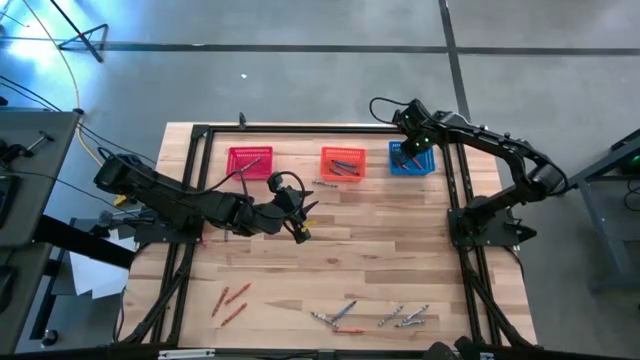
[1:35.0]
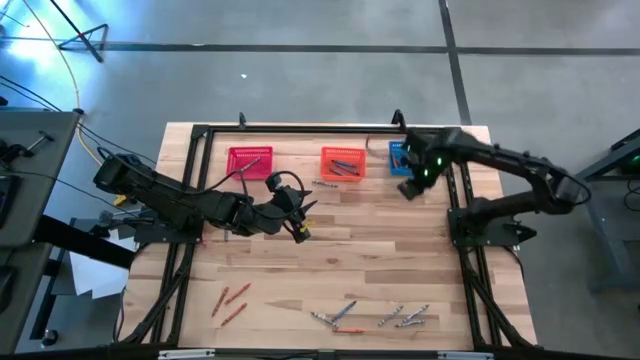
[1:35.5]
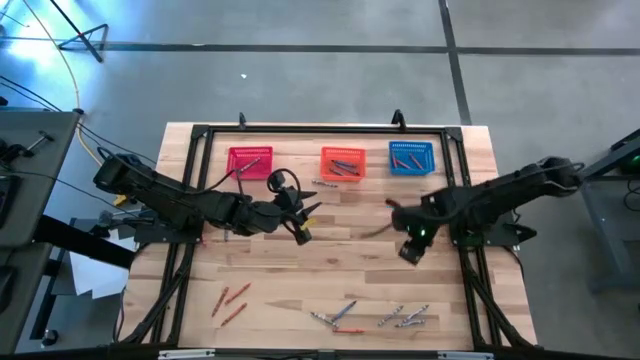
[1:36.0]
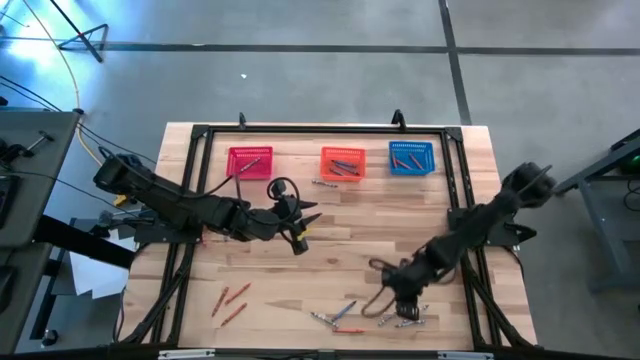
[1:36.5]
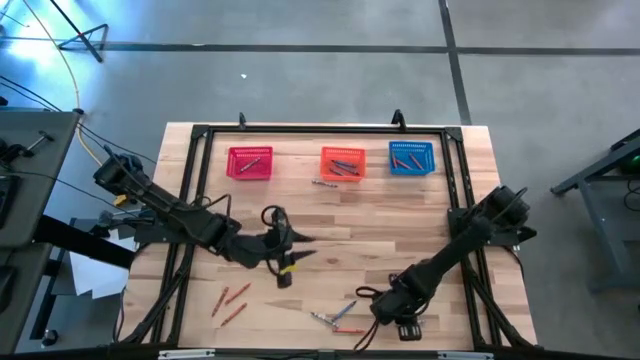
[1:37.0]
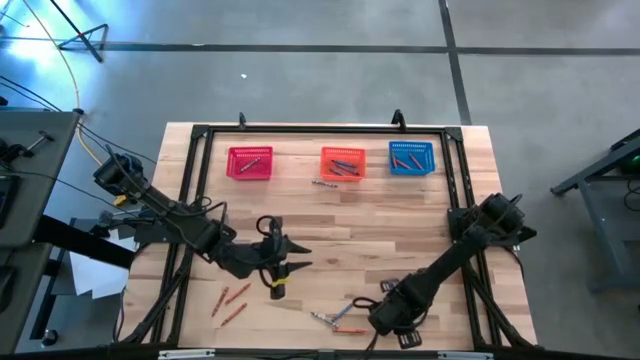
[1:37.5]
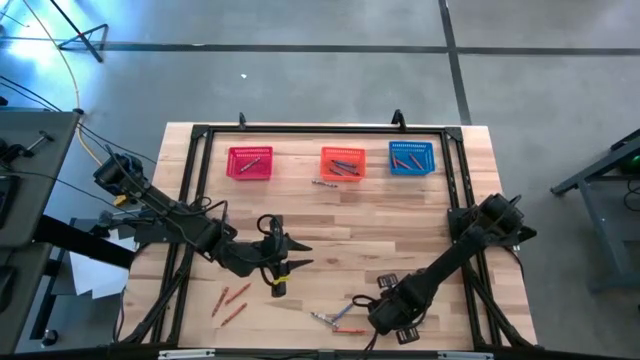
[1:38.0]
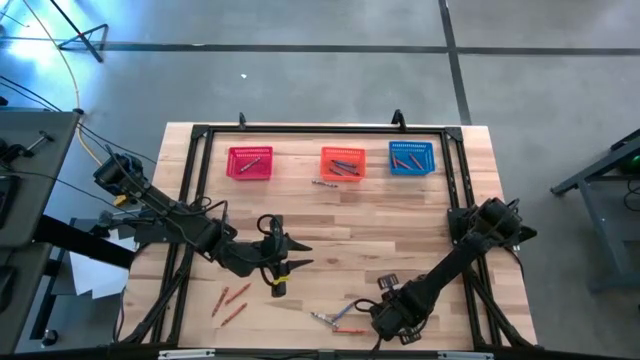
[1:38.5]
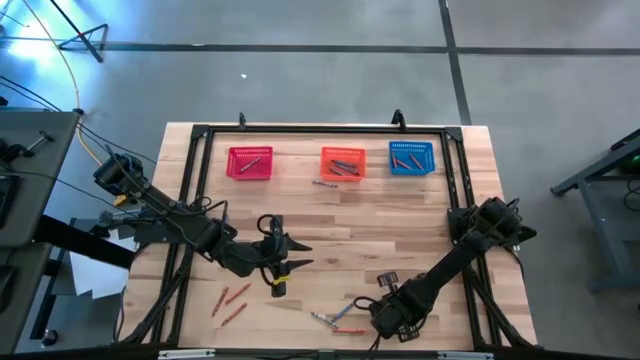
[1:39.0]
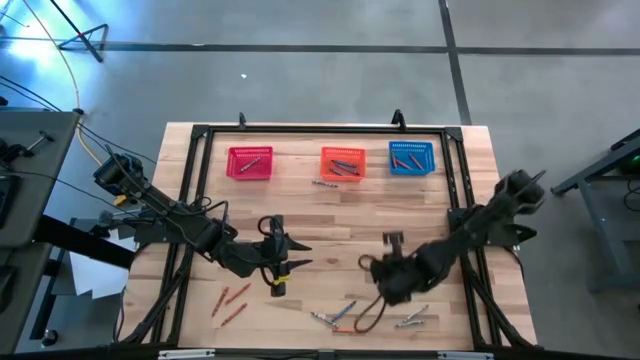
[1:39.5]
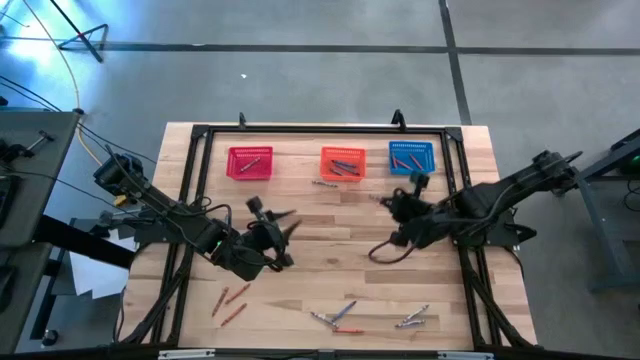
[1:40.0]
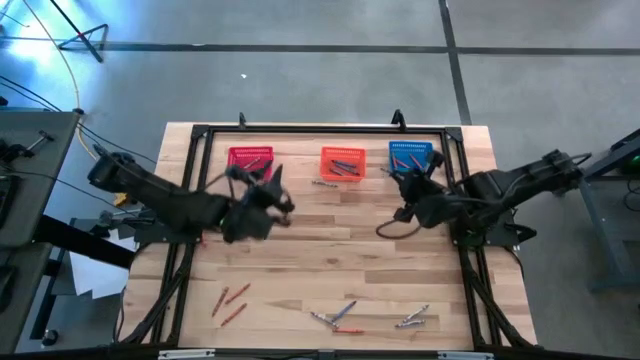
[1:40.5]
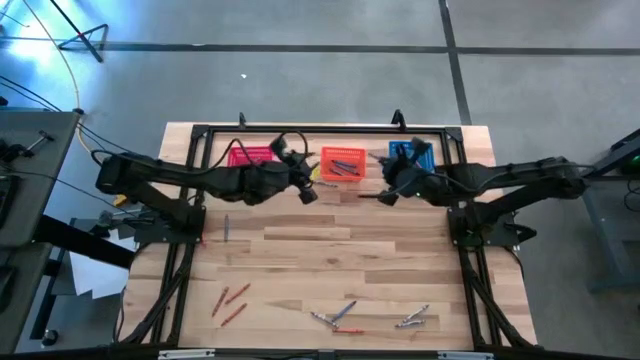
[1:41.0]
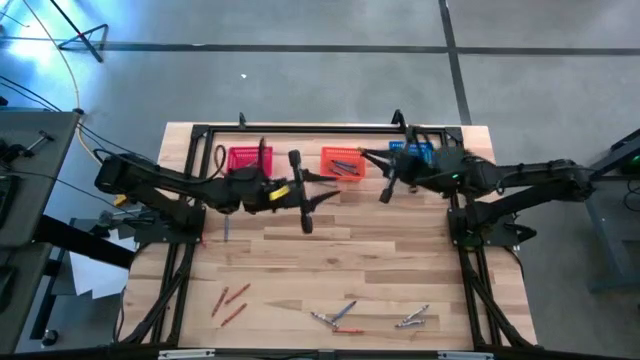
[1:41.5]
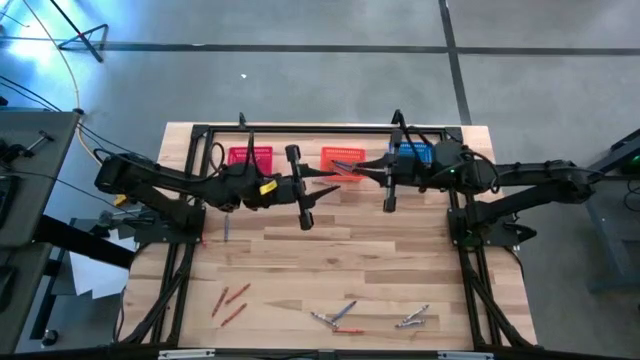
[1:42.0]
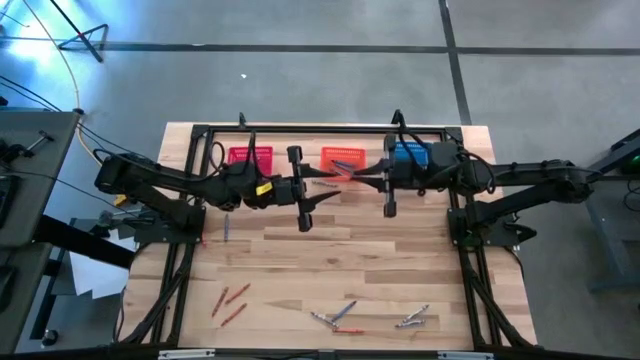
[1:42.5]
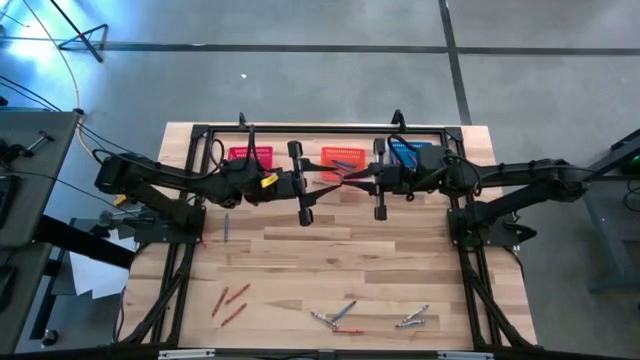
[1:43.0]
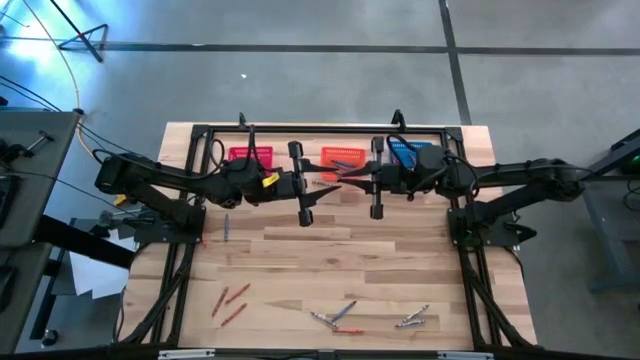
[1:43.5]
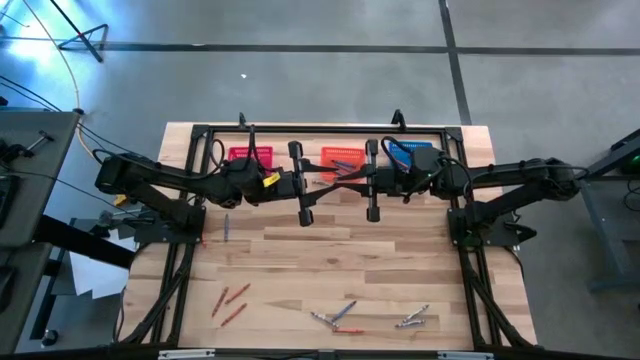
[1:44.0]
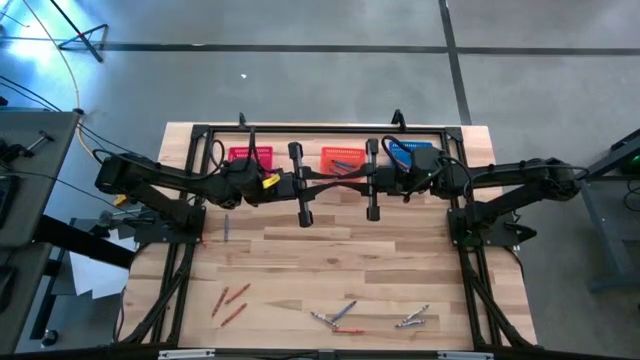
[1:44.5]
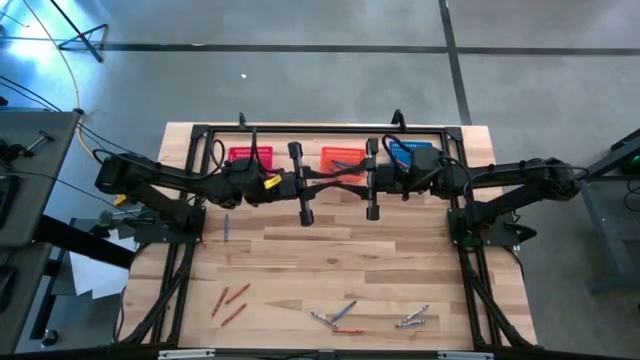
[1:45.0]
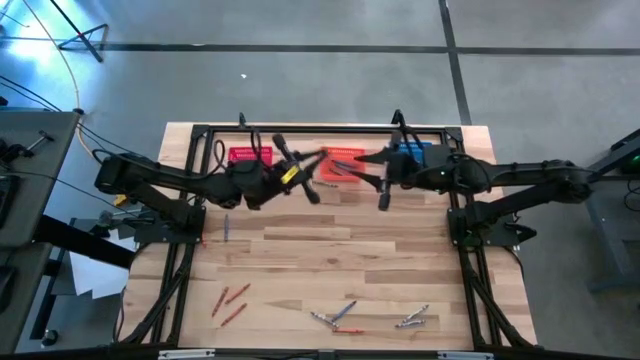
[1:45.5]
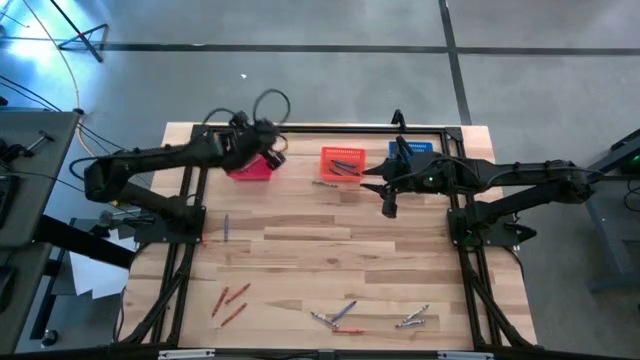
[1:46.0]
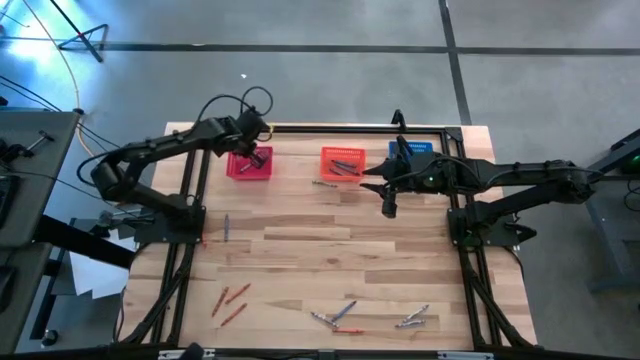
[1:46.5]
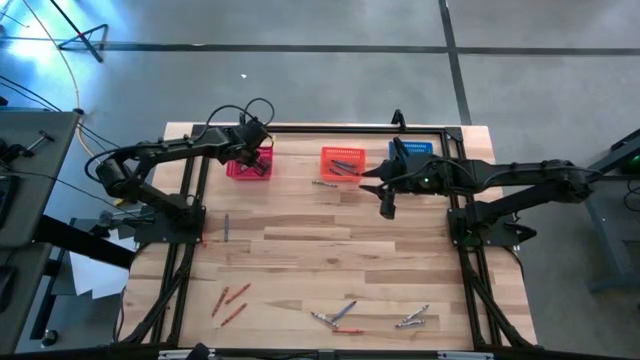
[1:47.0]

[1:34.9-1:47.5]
Task: Sort crayons
Put the gray crayon into the red bin

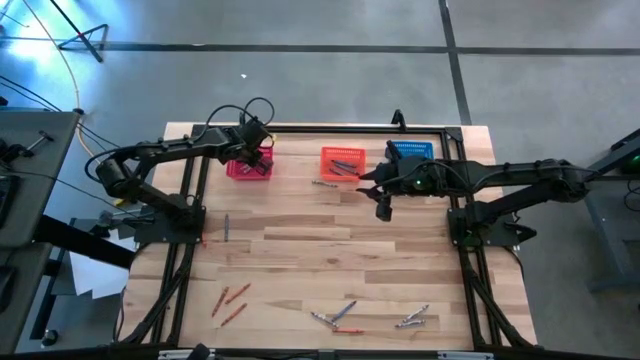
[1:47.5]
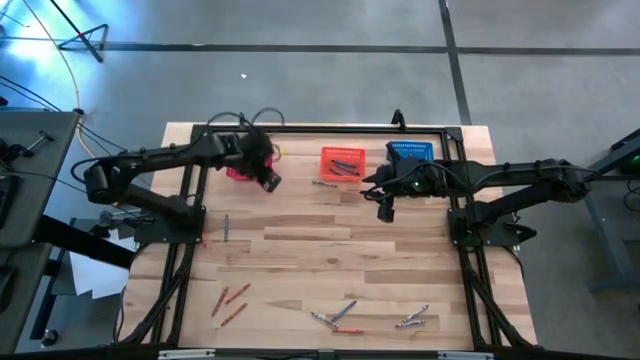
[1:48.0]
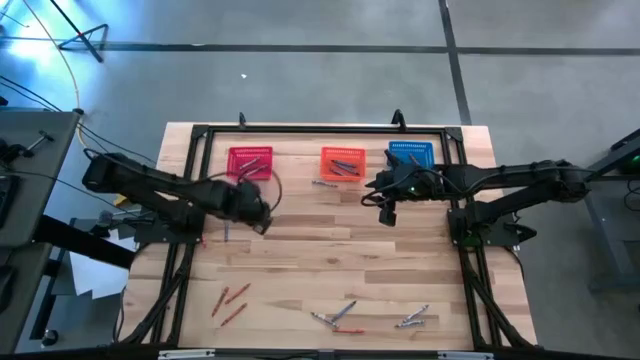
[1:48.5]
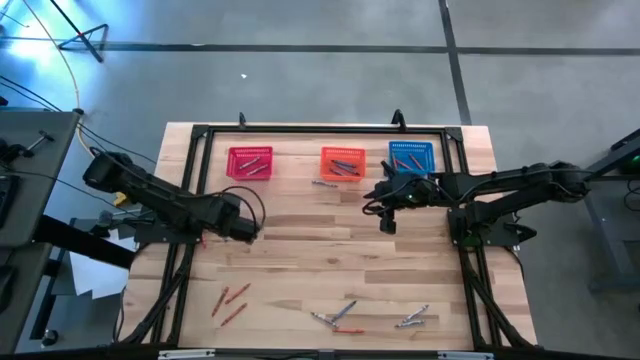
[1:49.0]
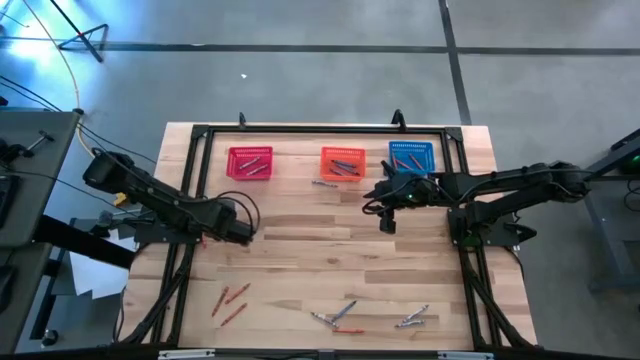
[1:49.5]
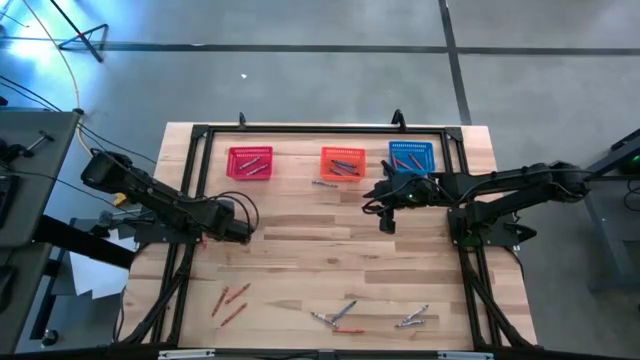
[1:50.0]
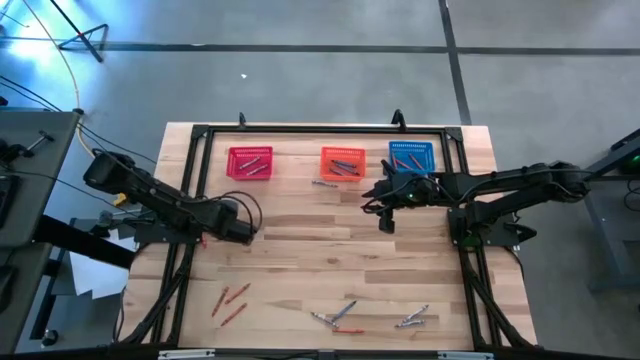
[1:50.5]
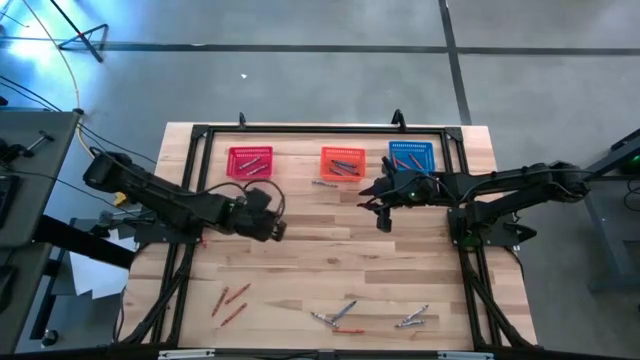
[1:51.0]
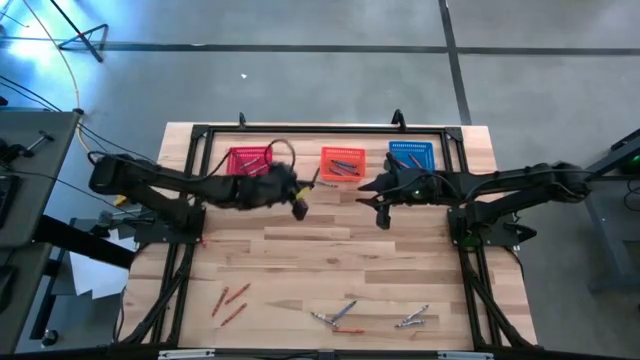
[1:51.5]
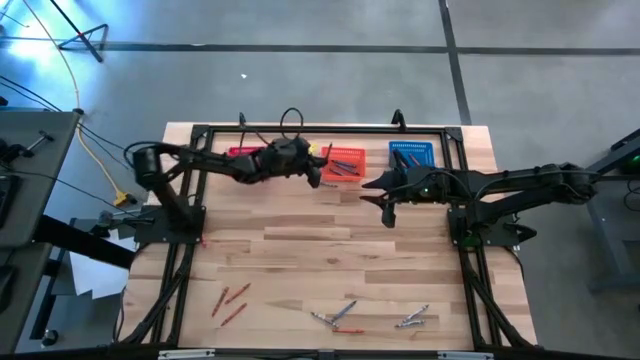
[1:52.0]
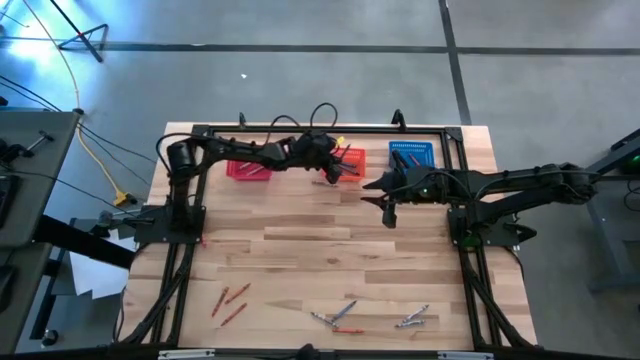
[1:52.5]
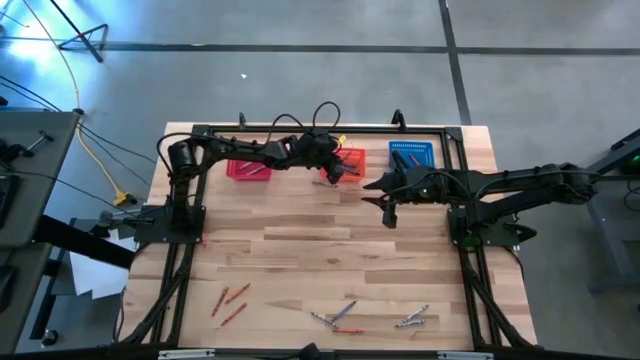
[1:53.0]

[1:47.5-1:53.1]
Put the blue crayon into the orange bin

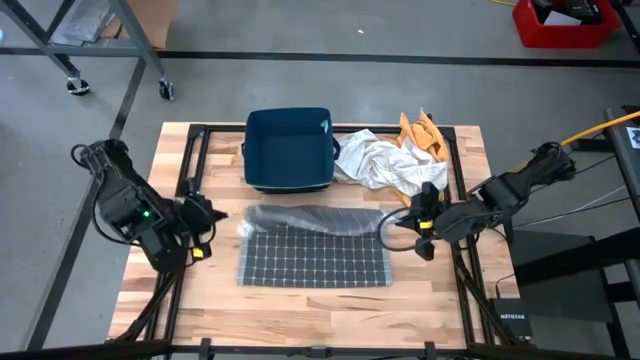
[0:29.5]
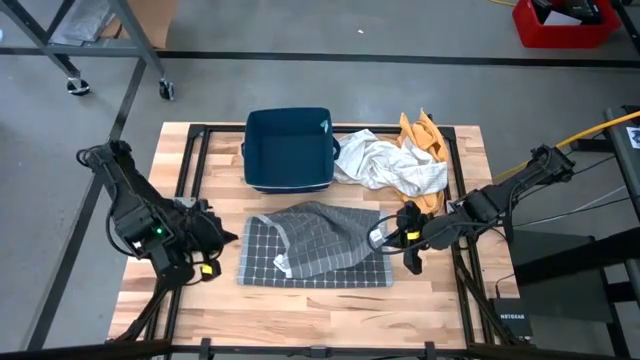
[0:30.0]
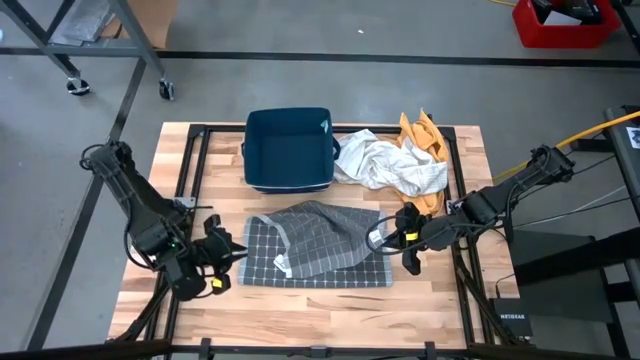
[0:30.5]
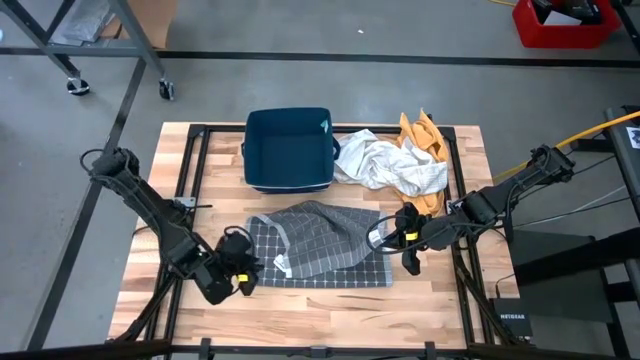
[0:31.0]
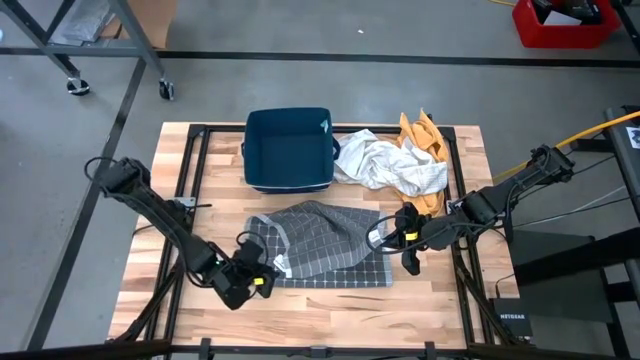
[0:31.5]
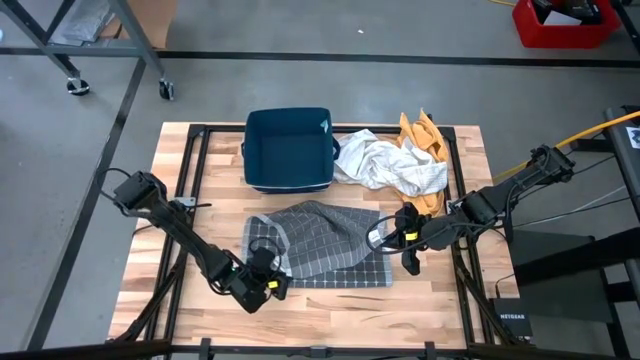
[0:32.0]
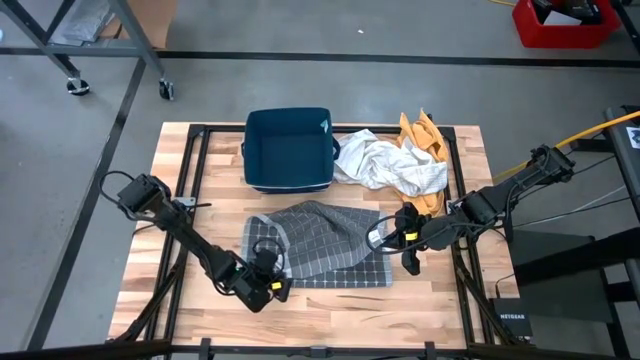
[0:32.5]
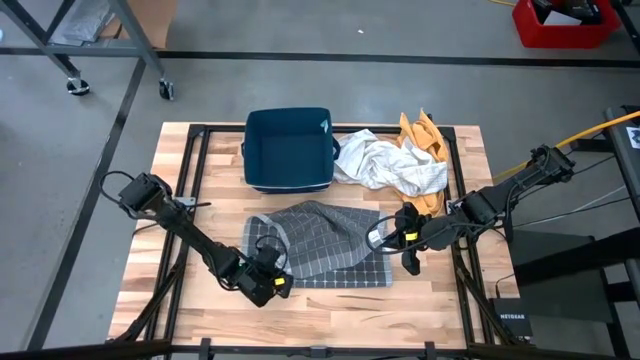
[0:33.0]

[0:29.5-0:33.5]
Task: Fold towel
Fold the gray patterned towel
